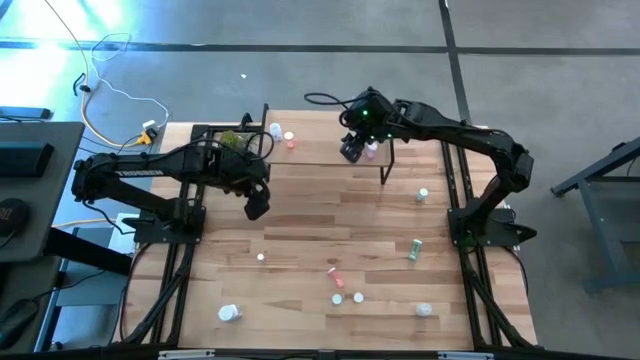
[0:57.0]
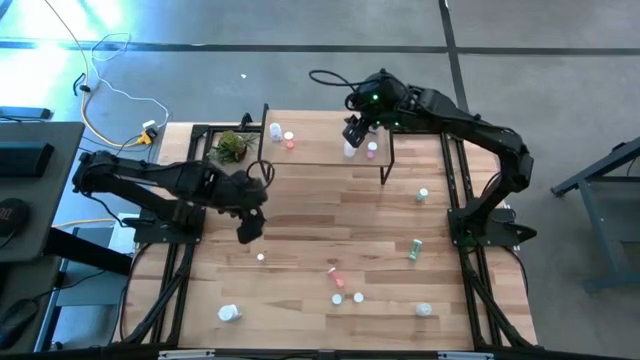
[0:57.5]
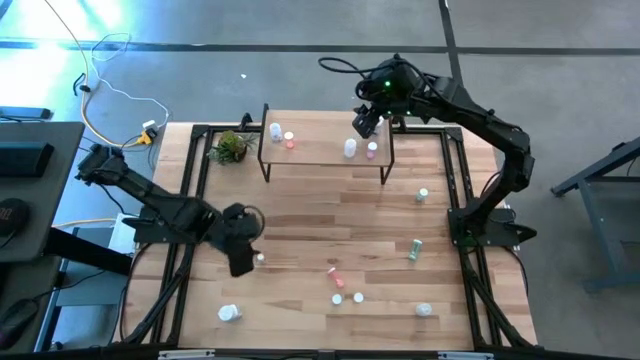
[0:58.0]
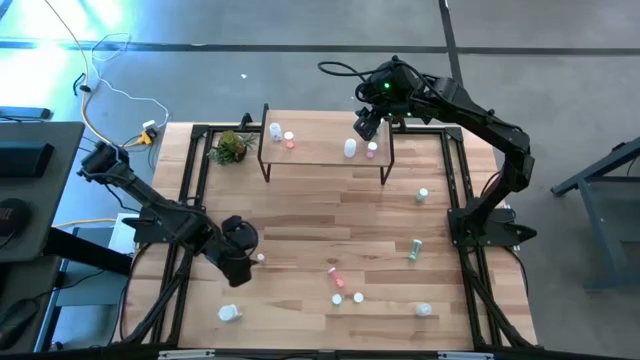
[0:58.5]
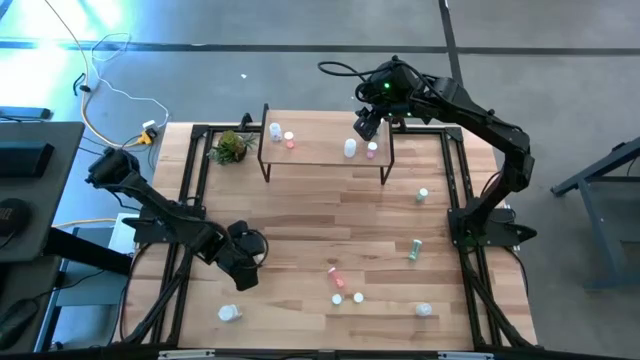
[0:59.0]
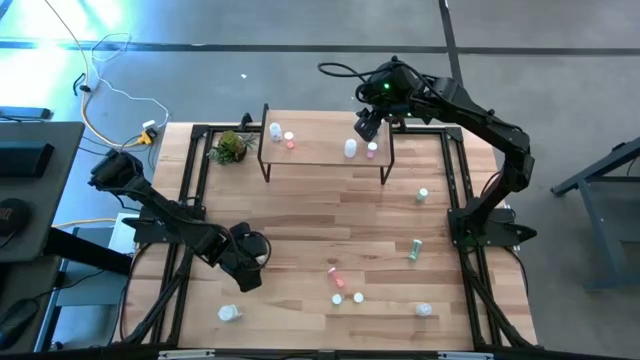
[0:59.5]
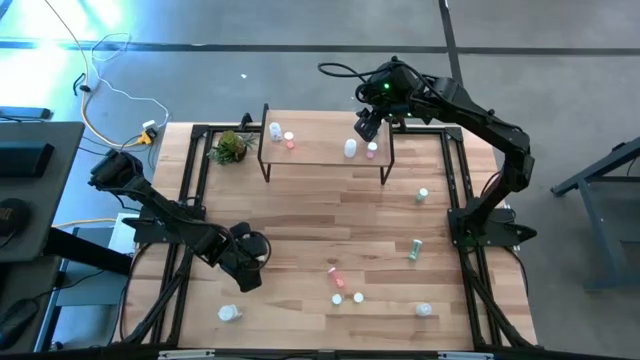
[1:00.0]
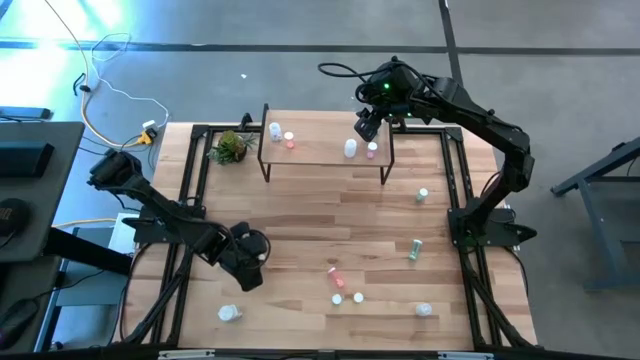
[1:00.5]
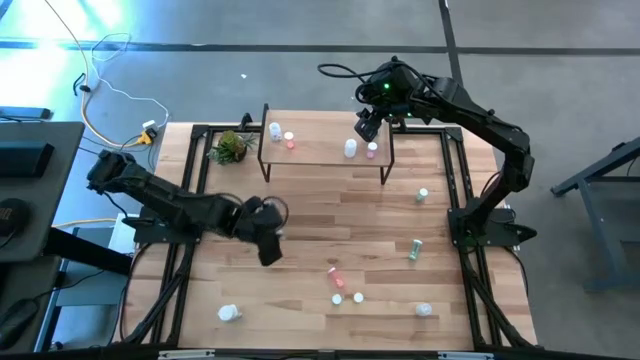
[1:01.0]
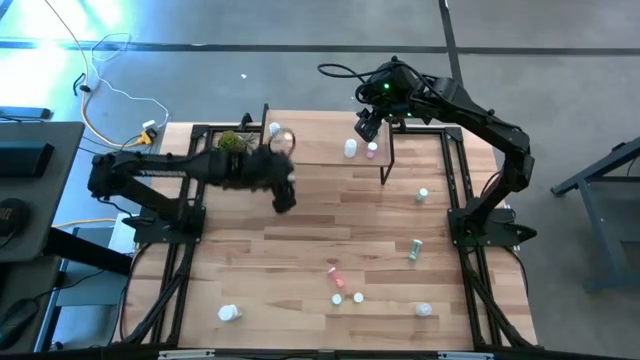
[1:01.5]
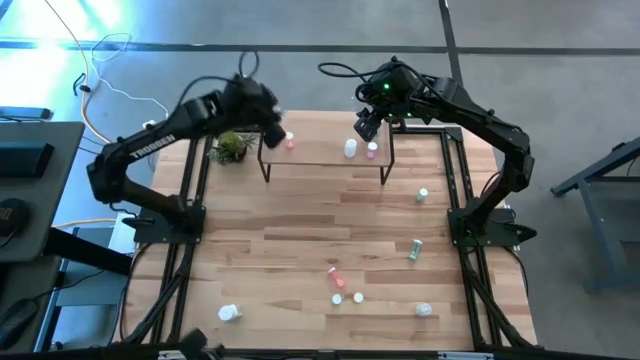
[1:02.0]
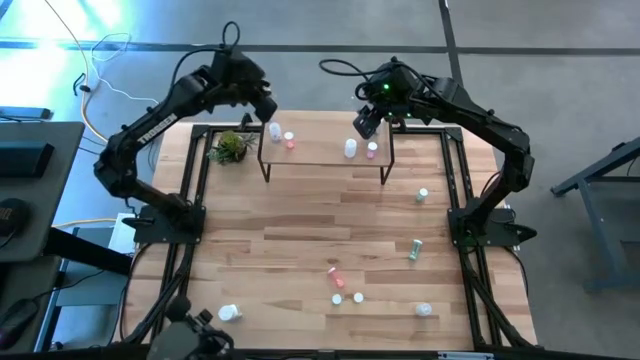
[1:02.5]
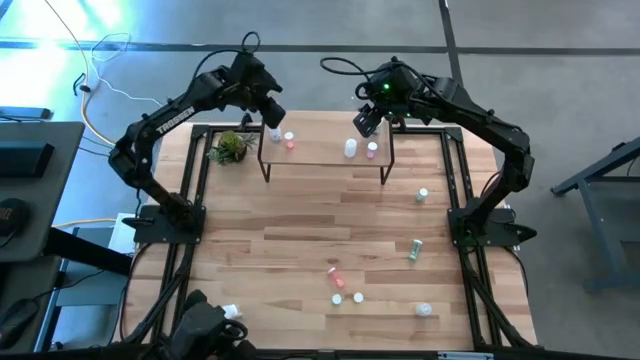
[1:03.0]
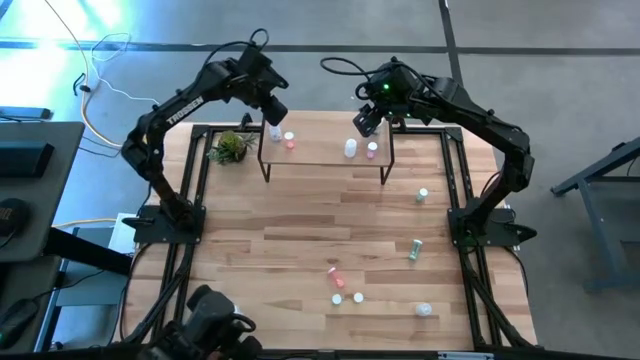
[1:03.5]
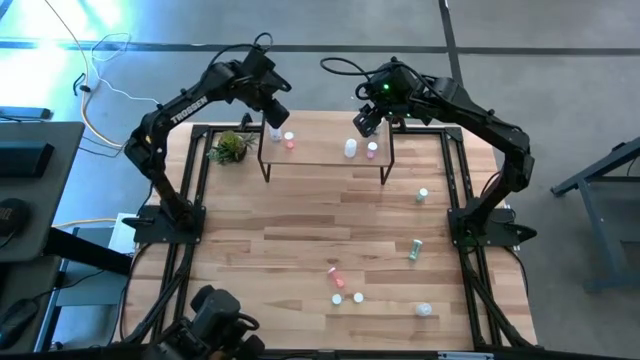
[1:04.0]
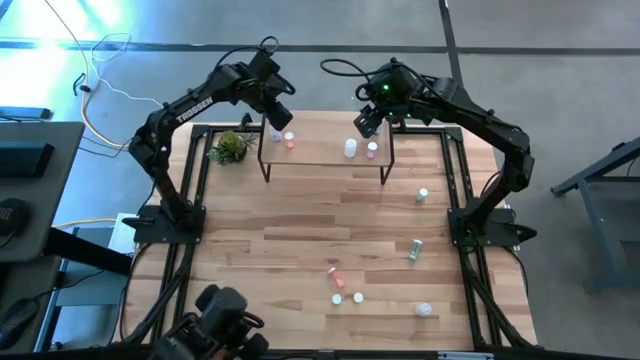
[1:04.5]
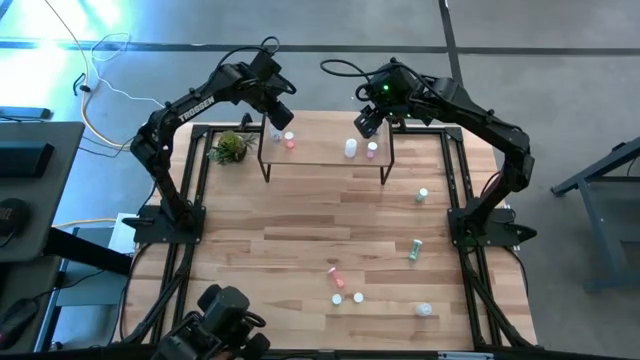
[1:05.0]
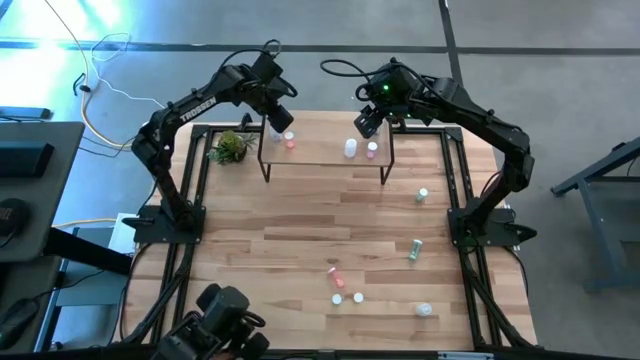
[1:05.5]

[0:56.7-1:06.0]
Task: Pick and place medicine bottles onto shelf by color
Put the white-yellow medicine bottle on the shelf

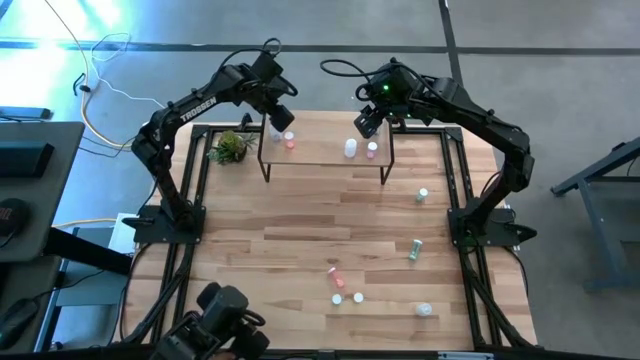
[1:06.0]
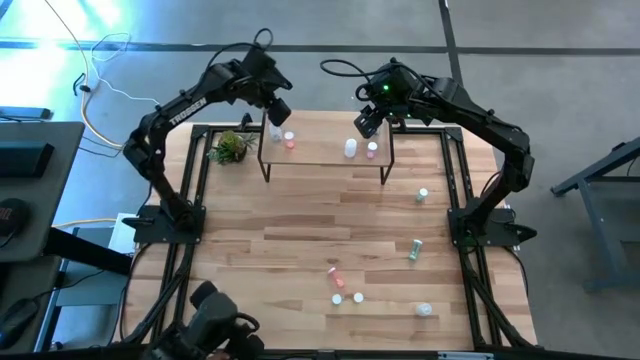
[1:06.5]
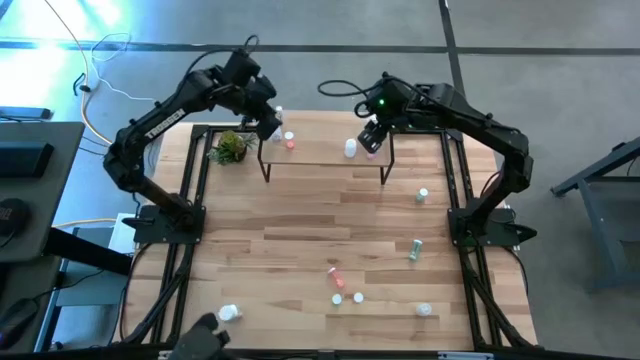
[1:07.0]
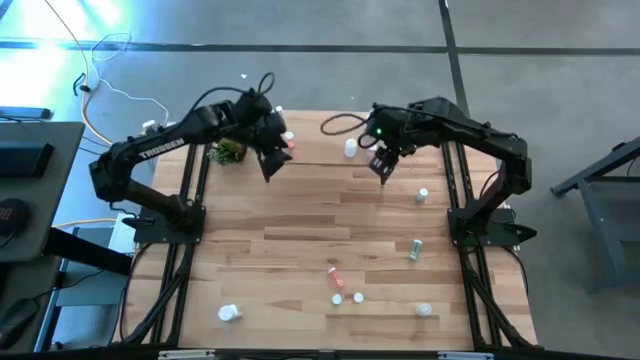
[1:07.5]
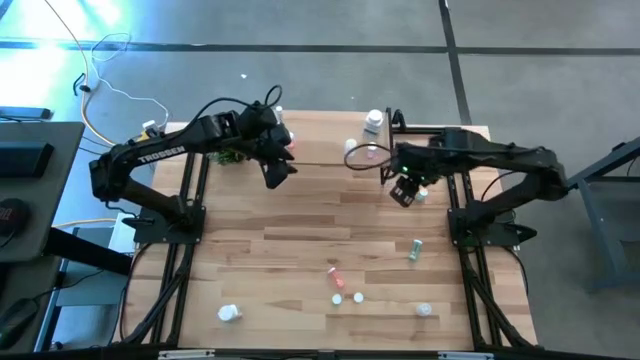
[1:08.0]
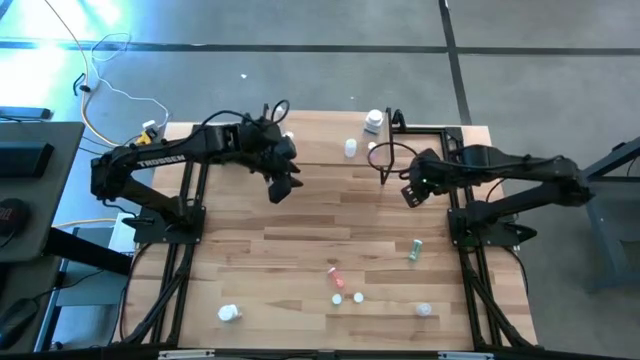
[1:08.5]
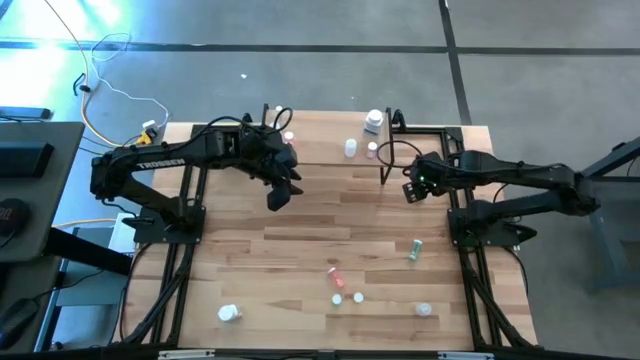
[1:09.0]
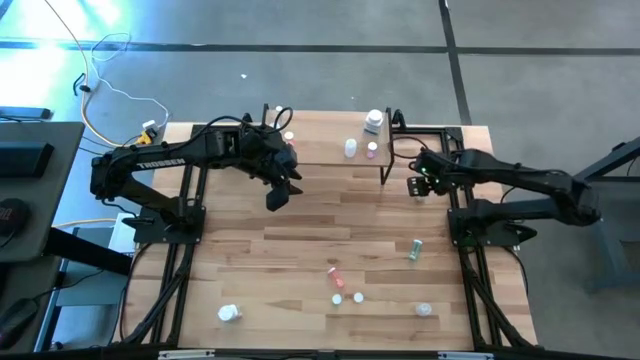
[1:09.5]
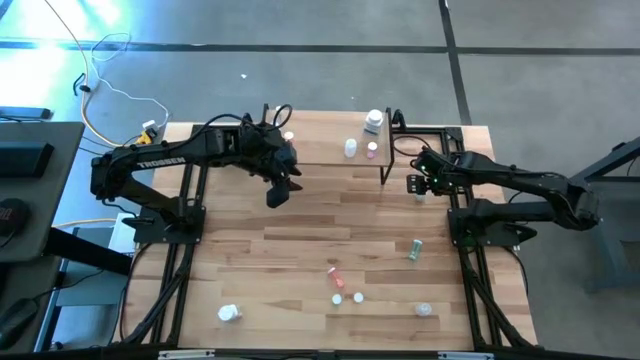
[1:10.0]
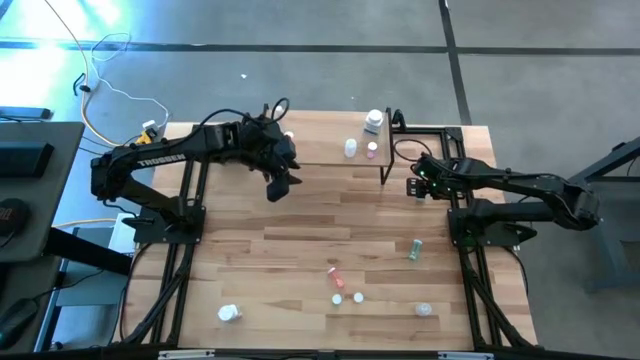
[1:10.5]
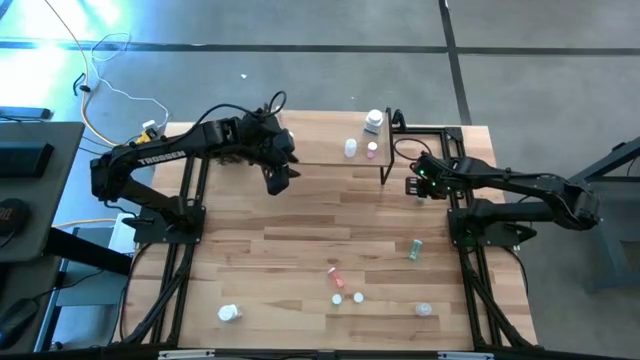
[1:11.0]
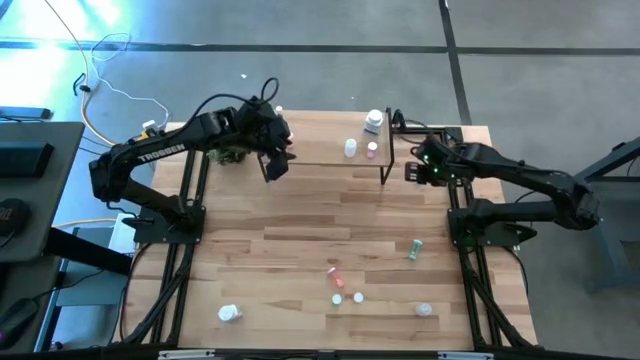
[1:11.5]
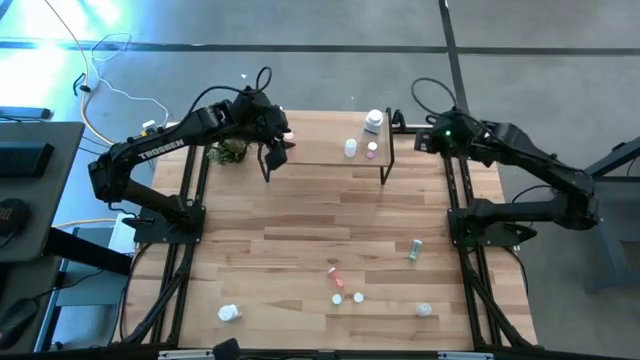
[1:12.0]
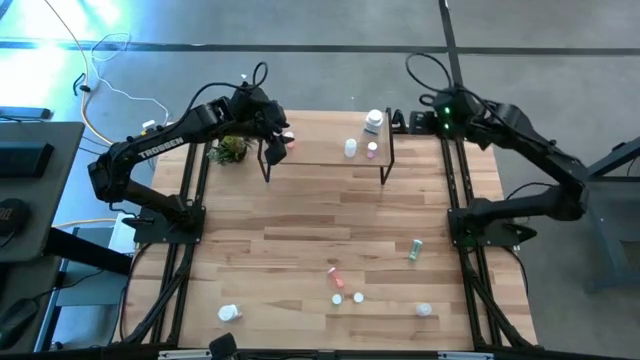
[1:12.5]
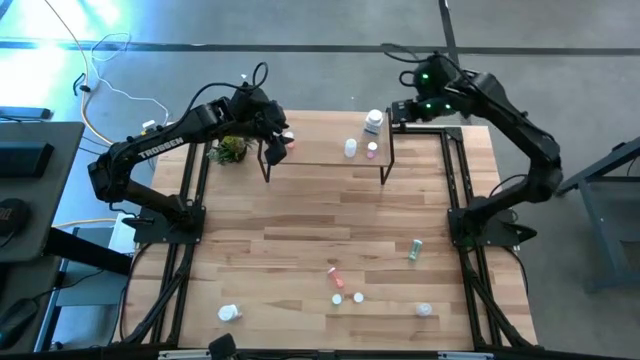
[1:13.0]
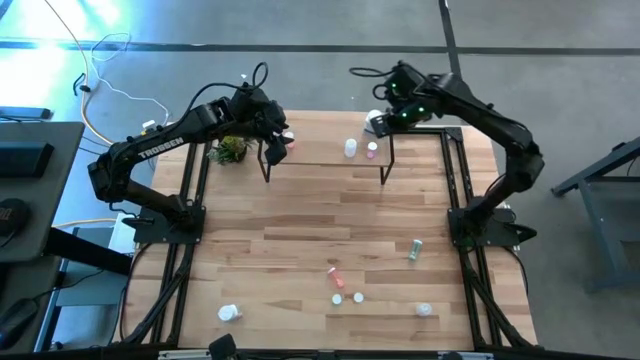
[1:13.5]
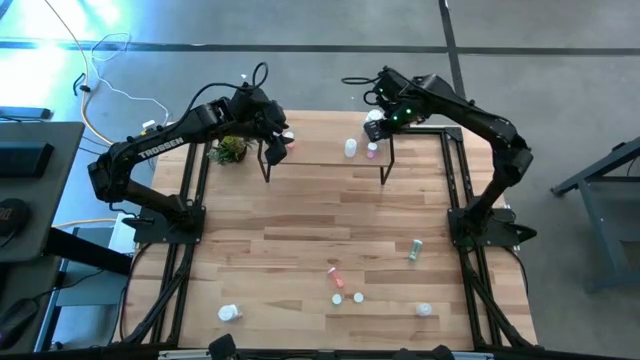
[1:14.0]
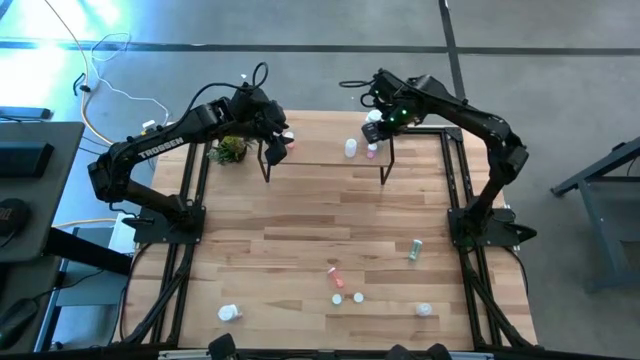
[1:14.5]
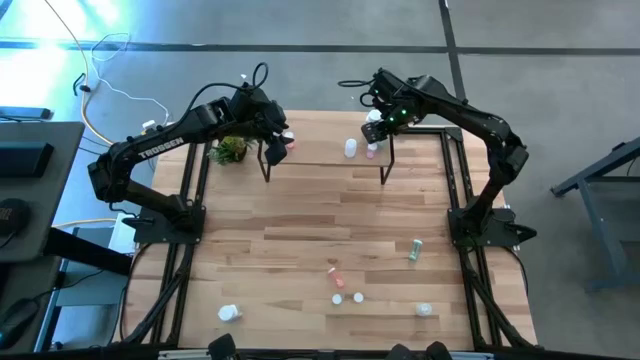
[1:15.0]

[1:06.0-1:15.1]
Put the top blue pill bottle on the shelf

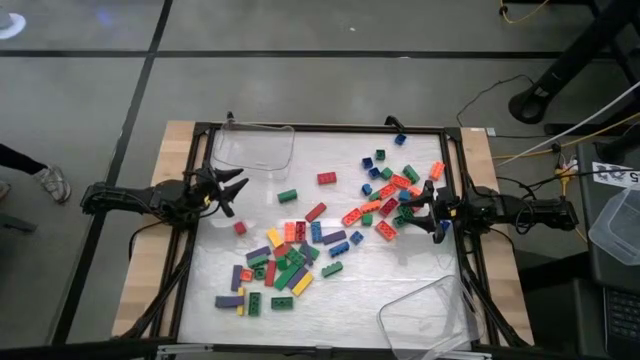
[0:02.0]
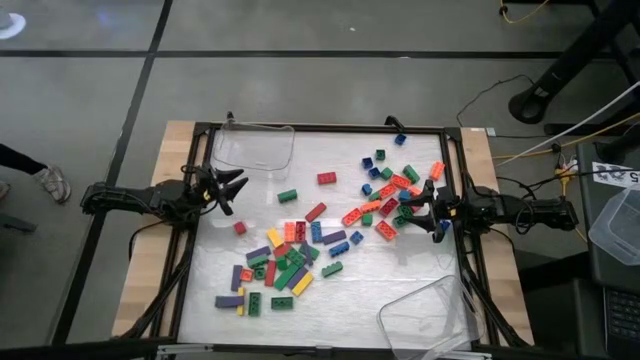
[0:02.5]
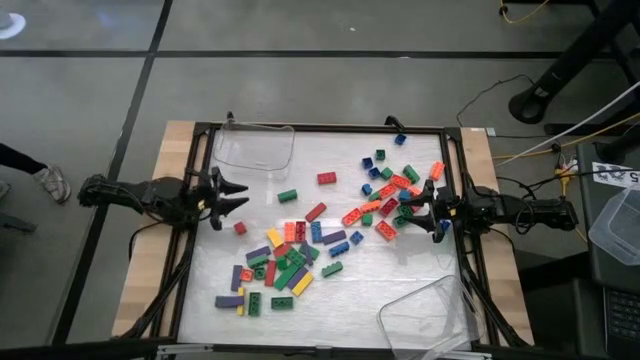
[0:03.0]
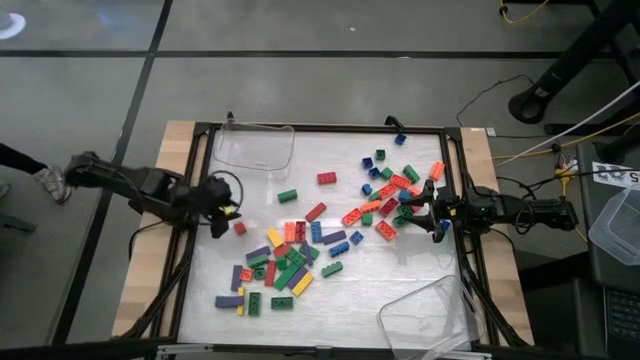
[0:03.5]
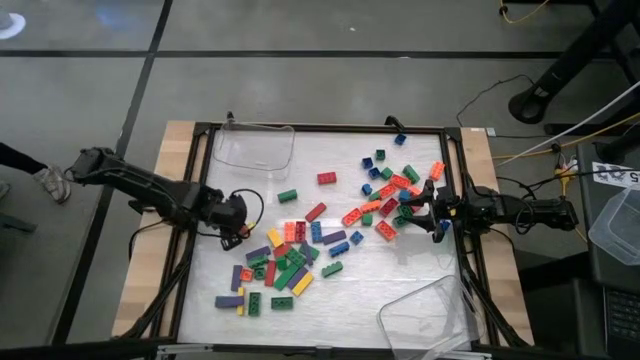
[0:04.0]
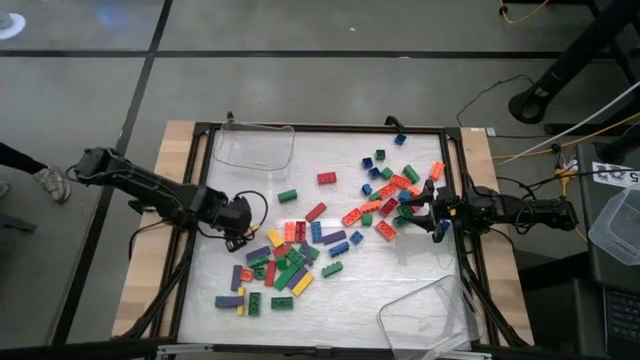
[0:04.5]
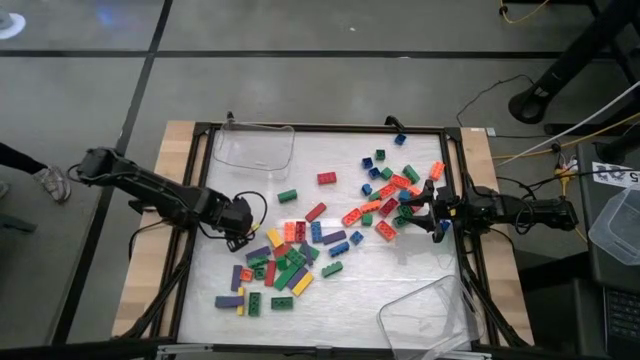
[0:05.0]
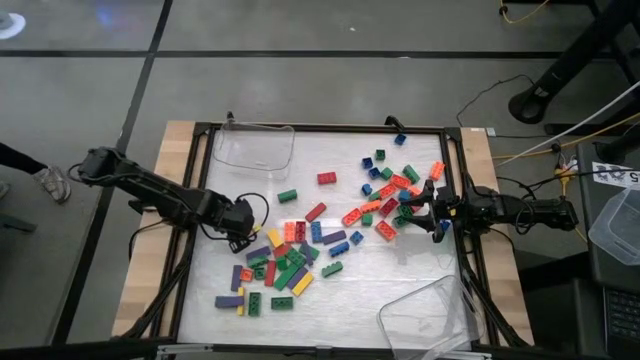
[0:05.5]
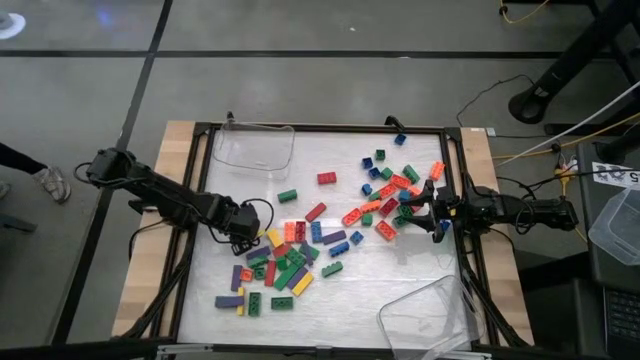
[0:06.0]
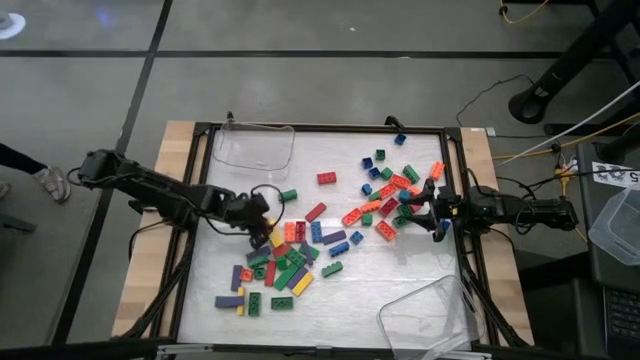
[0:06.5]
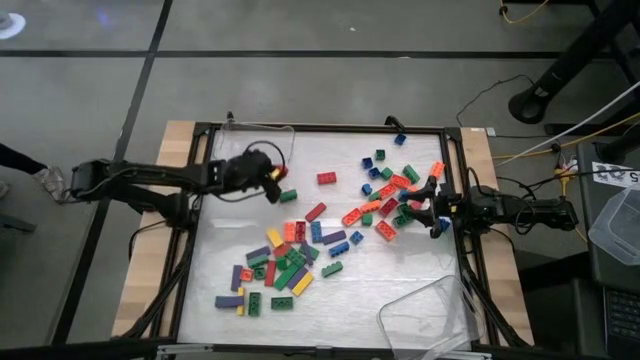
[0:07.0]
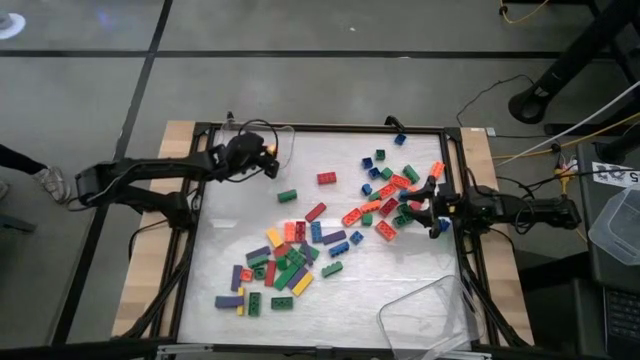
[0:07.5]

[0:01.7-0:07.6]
Task: Sort blocks by size
Put the square red block into the top transparent bin
